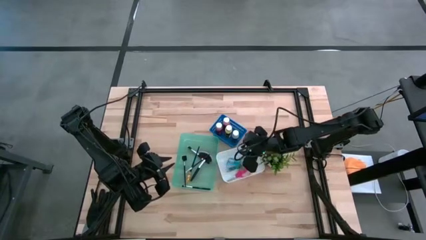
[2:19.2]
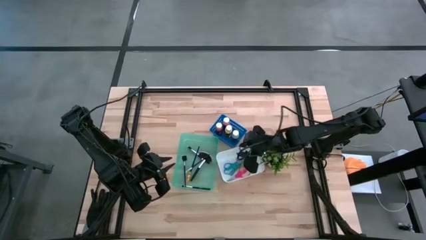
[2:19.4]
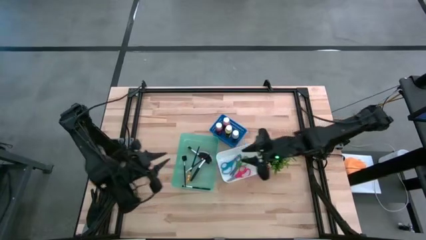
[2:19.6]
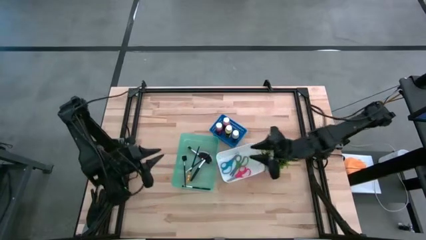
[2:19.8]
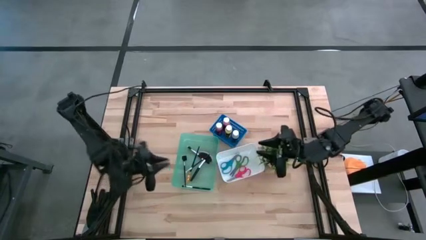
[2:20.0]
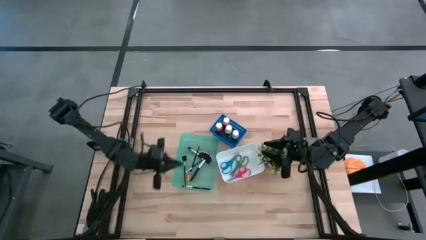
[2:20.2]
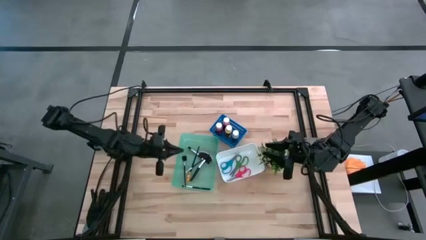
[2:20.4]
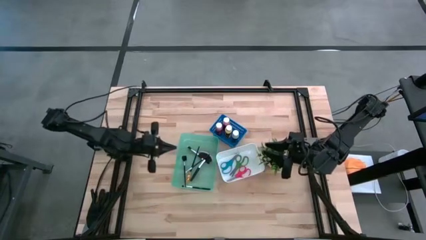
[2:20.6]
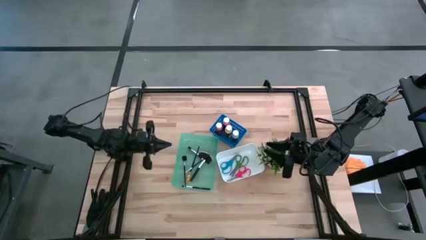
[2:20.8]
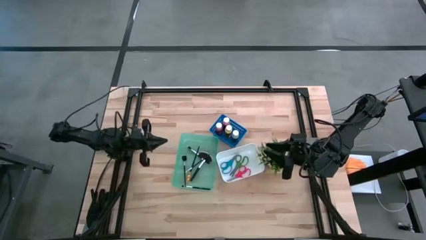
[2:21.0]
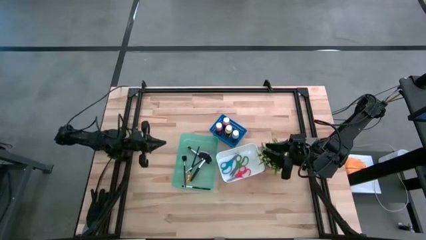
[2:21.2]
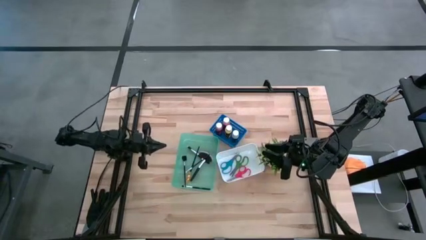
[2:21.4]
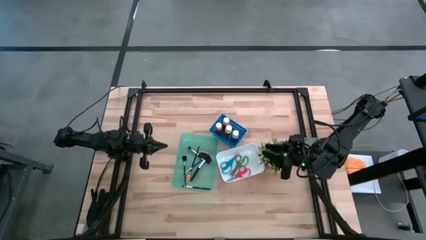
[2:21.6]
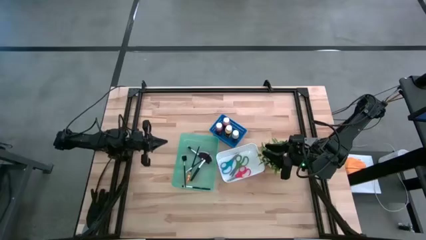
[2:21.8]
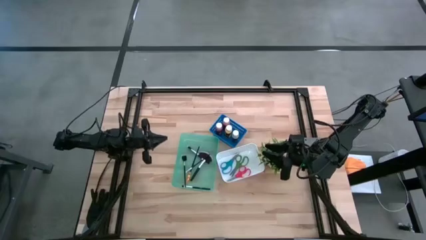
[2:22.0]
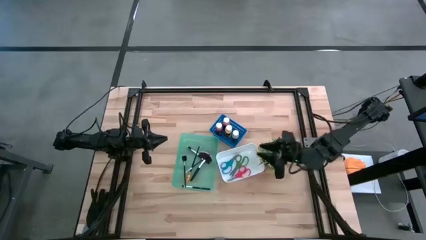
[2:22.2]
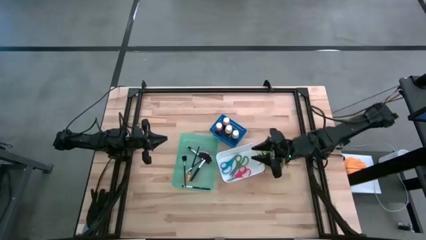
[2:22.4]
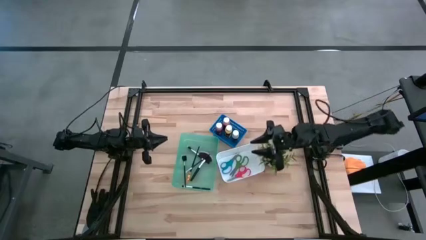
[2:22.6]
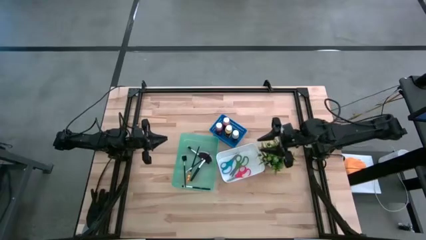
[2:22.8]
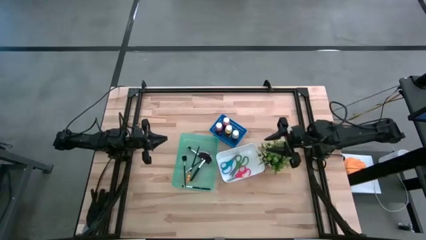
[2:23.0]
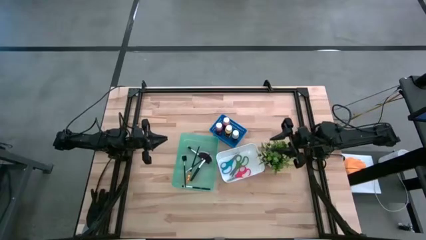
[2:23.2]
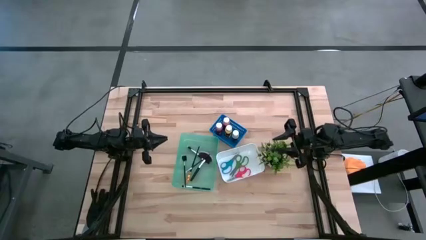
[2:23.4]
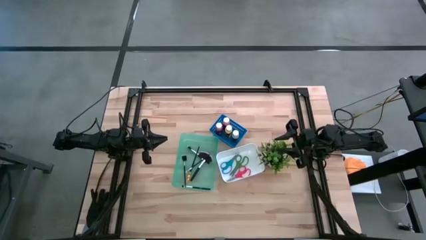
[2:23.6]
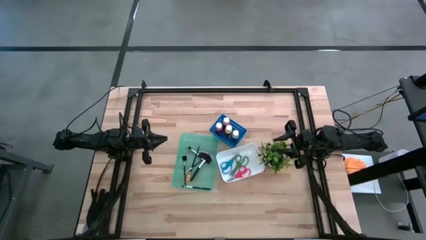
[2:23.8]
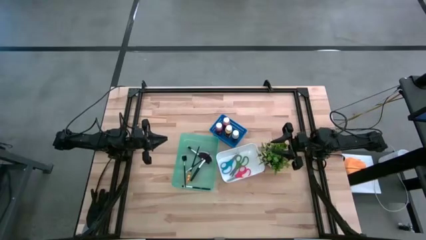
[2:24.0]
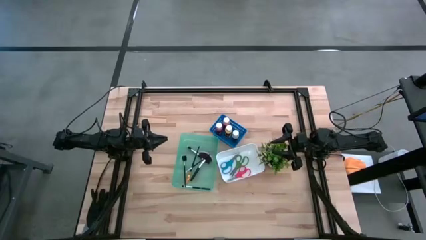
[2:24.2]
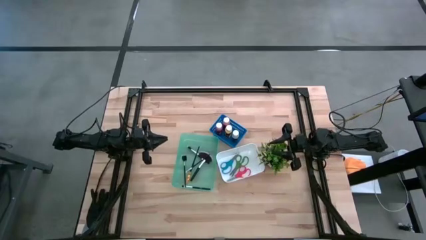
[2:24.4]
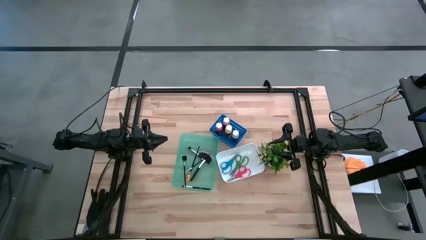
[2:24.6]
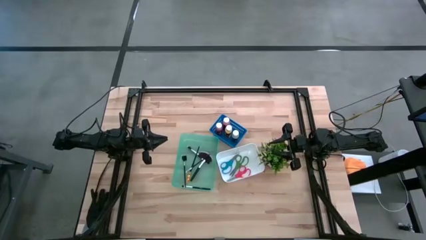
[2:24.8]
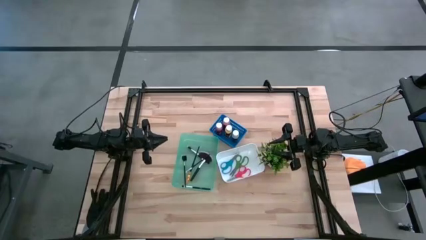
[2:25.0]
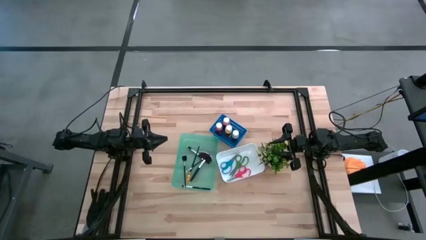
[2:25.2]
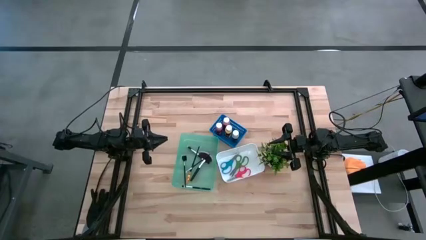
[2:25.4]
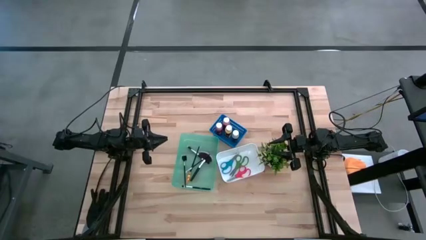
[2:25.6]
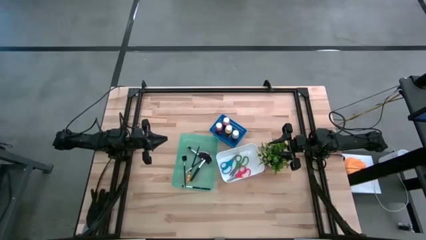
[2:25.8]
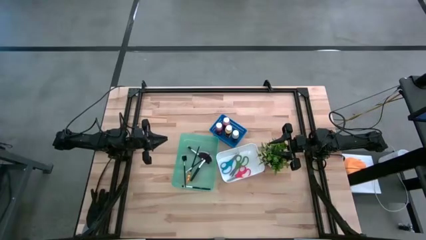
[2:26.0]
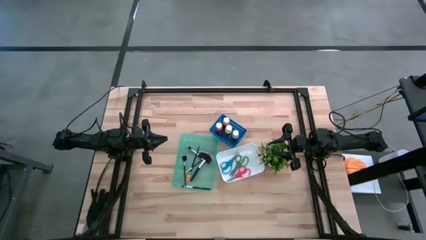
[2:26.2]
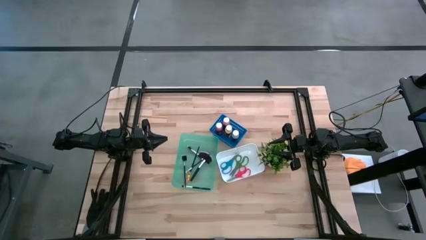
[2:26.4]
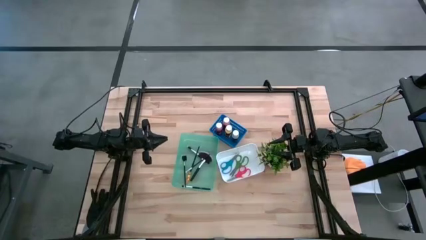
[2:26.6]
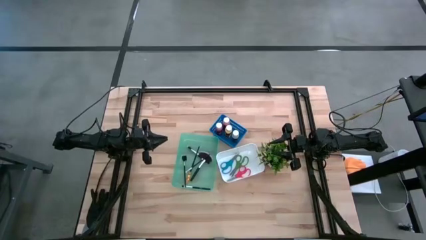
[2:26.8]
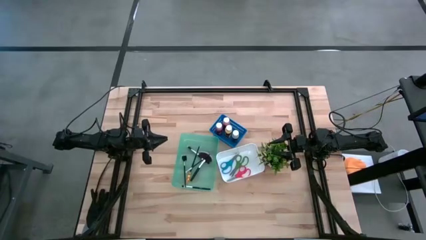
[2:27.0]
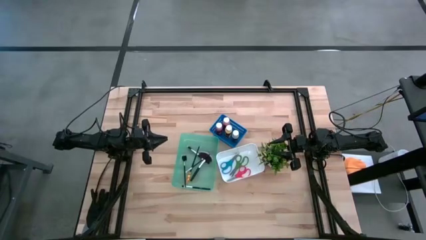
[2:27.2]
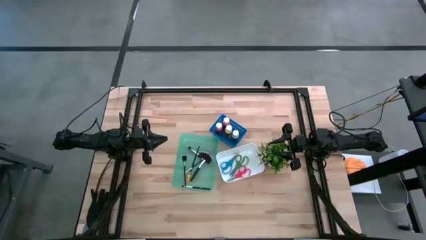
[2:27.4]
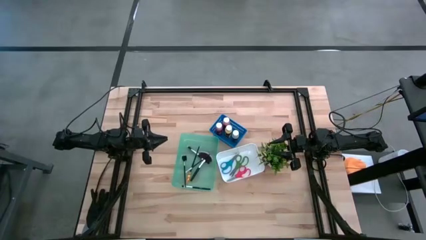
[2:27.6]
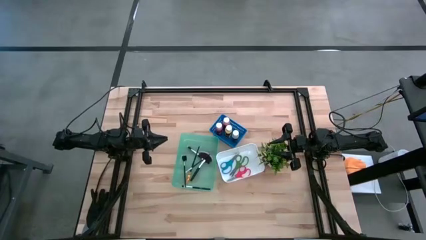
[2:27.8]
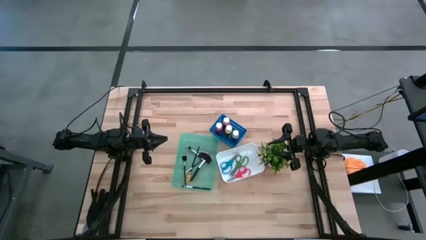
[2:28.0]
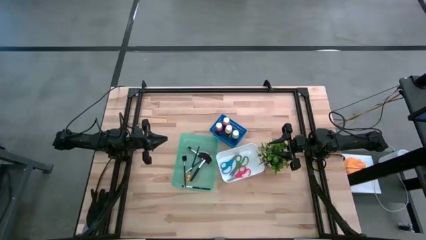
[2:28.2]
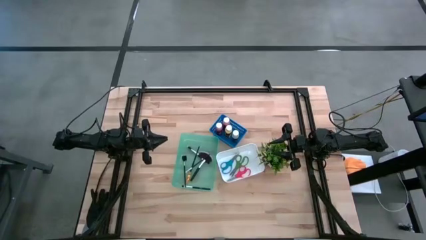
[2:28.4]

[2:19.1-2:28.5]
Task: Pick & Place Paint Supplies
Return to Home Position

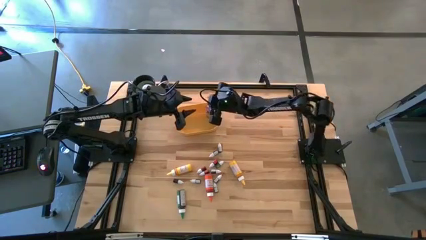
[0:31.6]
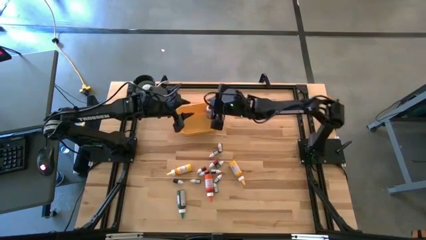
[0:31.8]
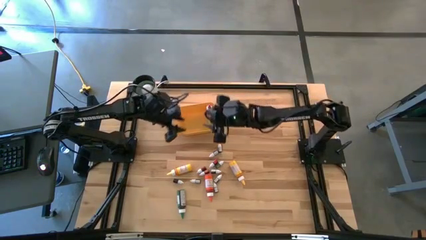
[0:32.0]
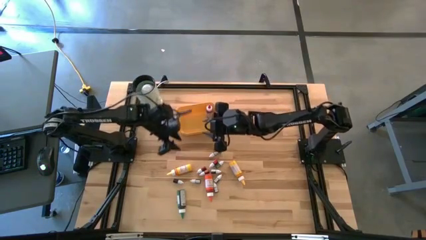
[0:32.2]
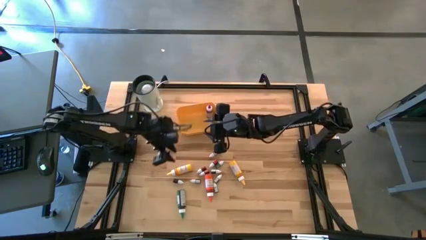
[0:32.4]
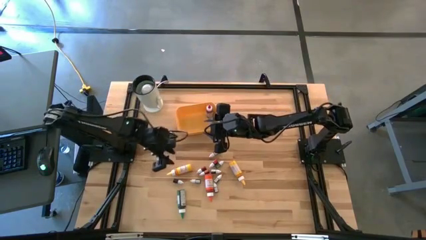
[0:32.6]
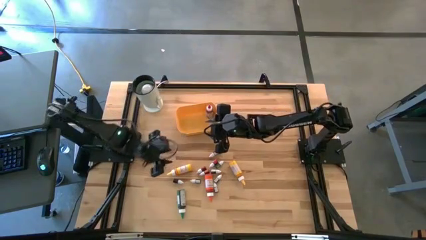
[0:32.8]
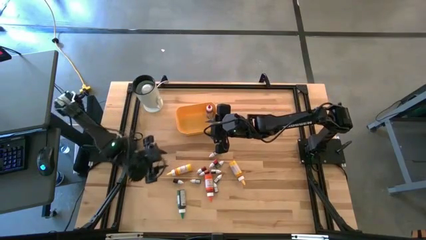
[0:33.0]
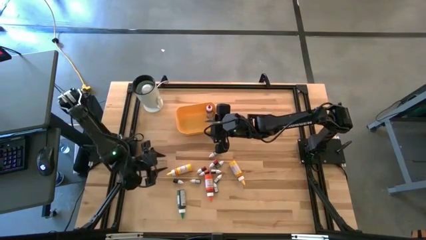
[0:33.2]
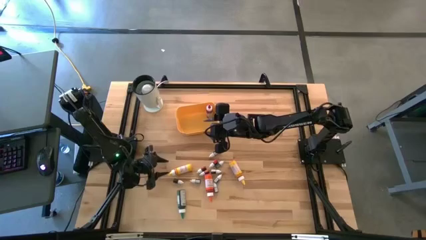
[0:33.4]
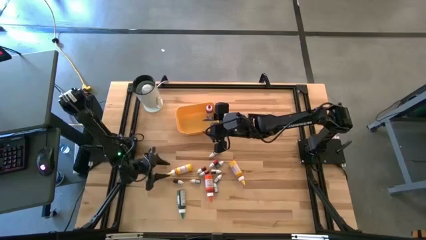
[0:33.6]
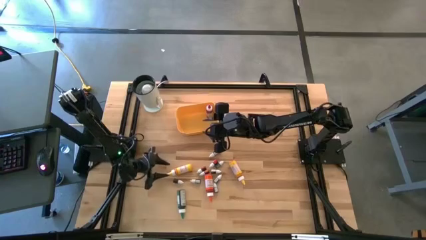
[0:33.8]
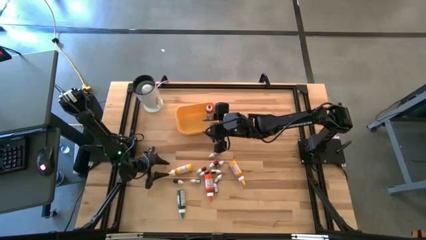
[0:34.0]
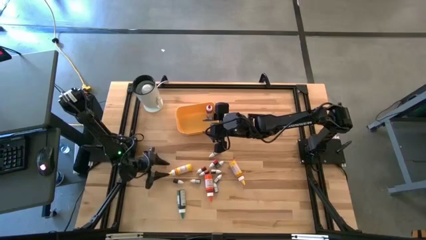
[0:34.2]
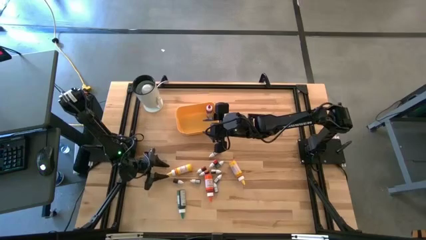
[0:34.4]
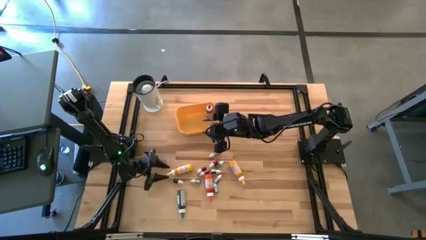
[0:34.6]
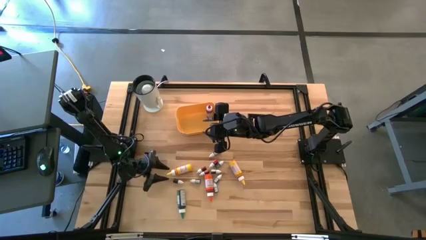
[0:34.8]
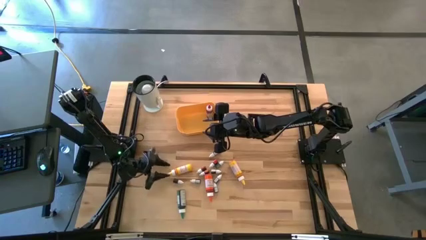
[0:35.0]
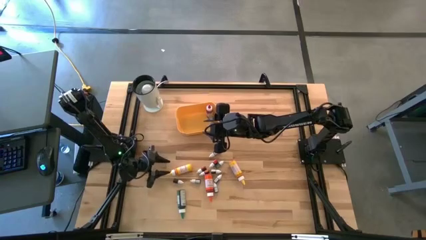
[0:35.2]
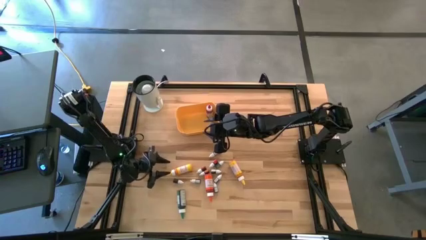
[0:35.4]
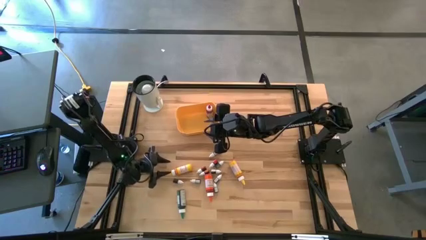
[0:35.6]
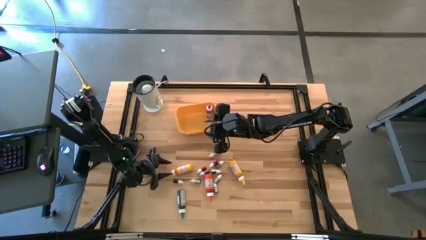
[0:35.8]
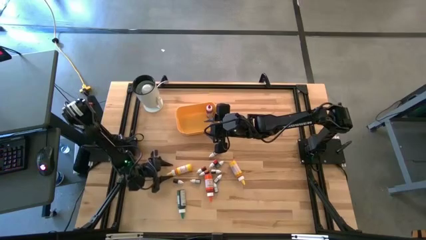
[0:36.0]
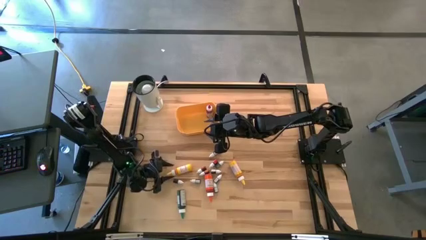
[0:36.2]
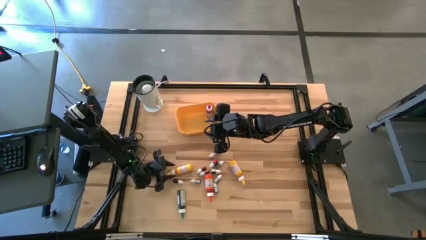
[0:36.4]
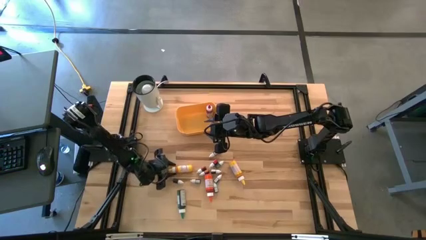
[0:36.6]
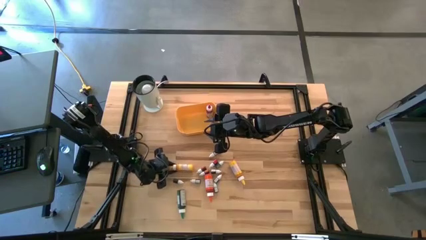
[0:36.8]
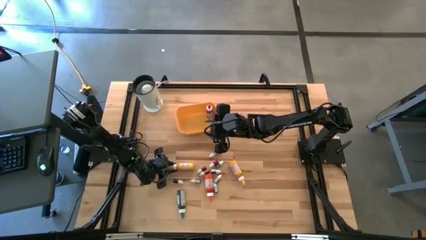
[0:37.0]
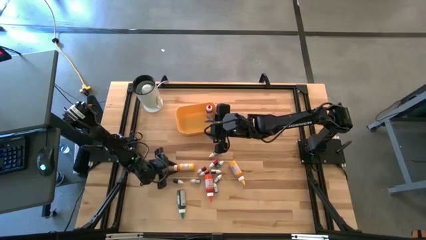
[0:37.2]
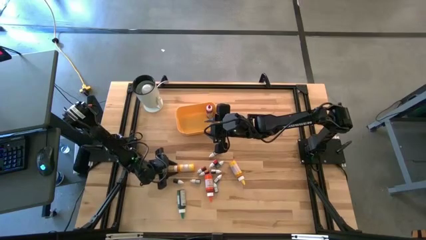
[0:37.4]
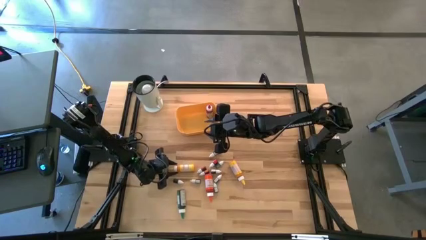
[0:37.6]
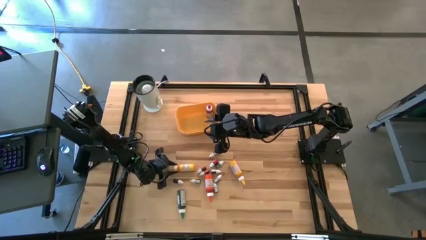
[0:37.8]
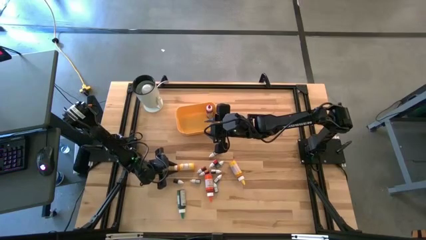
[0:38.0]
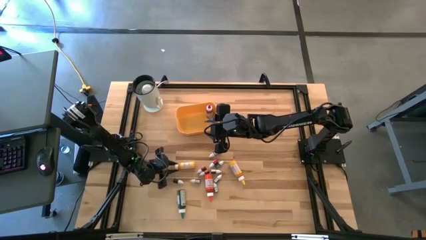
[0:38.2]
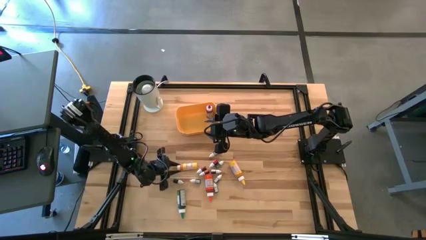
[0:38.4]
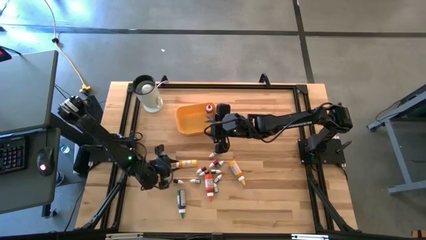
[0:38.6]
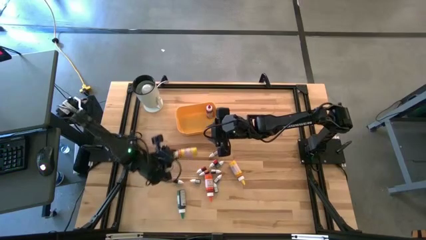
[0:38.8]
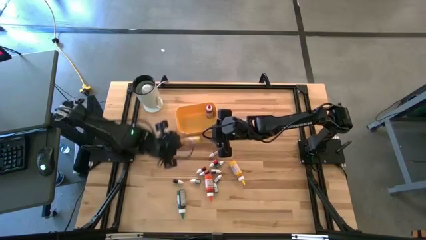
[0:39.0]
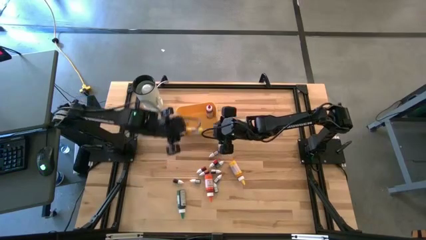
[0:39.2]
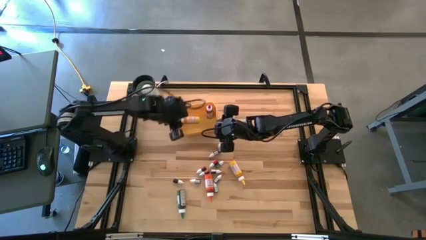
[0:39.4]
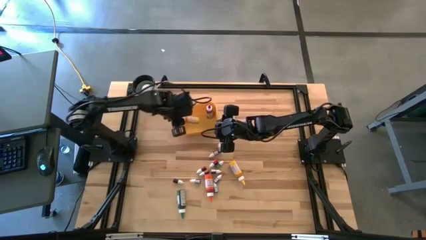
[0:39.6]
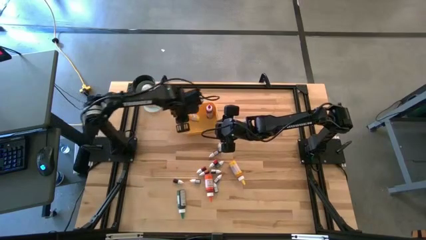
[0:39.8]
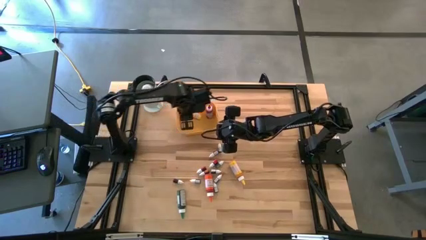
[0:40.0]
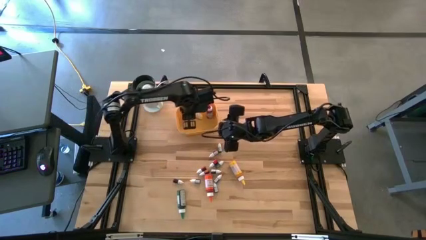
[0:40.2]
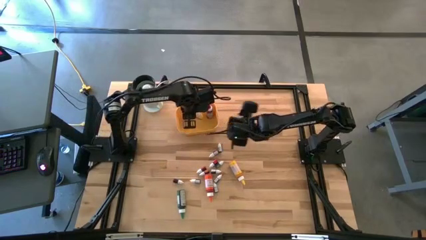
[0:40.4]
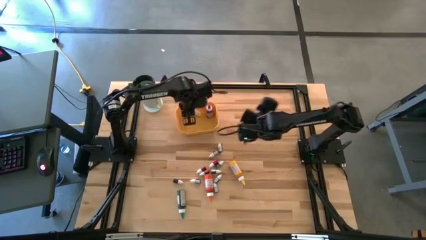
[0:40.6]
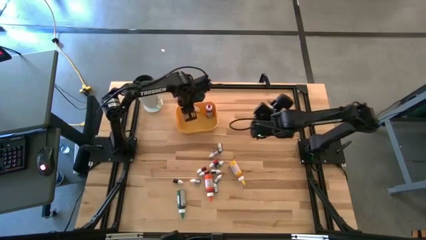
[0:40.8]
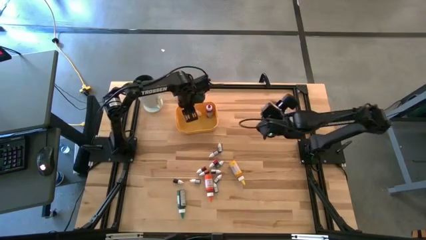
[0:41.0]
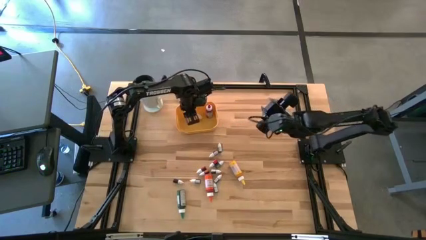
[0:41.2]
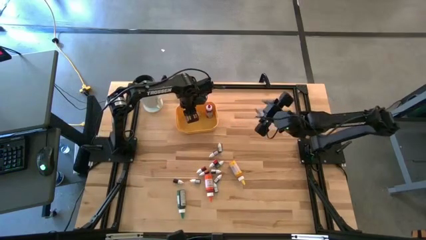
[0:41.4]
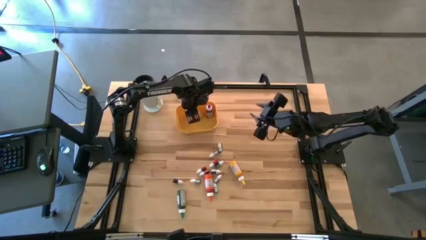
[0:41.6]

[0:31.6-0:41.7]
Task: Pick & Place food coloring
Put the large yellow food coloring bottle into the yellow bin
